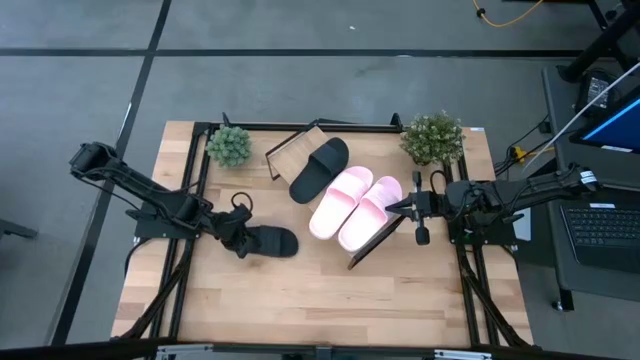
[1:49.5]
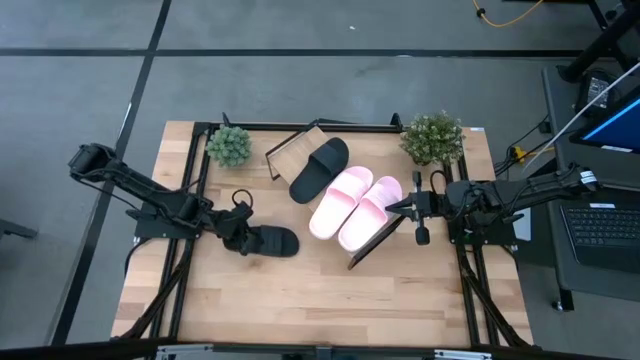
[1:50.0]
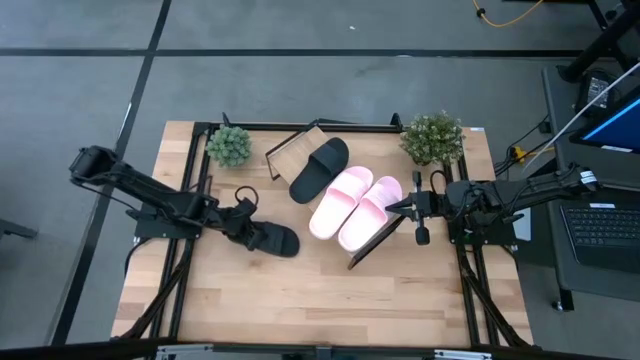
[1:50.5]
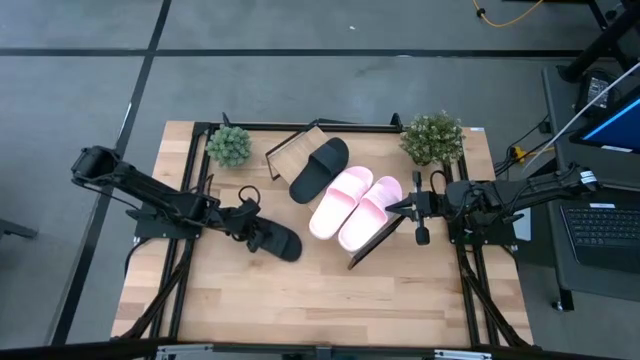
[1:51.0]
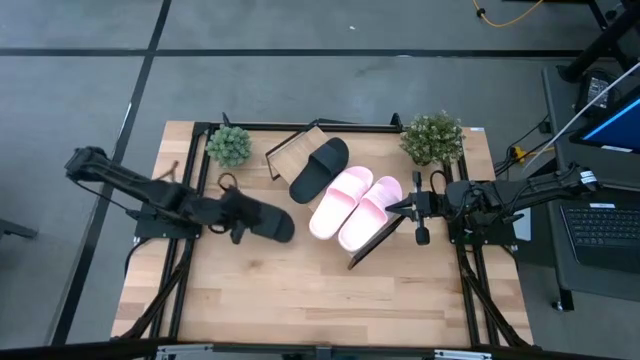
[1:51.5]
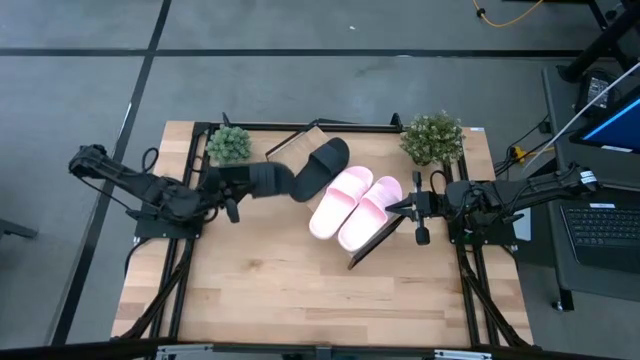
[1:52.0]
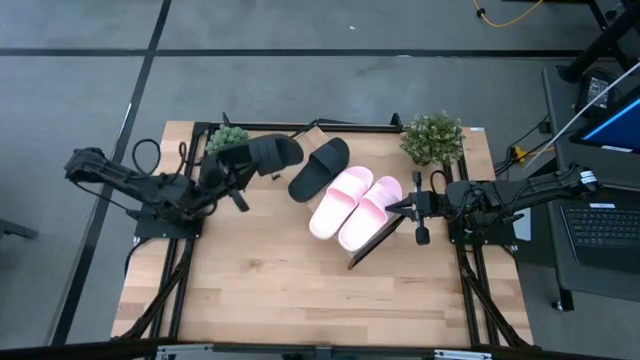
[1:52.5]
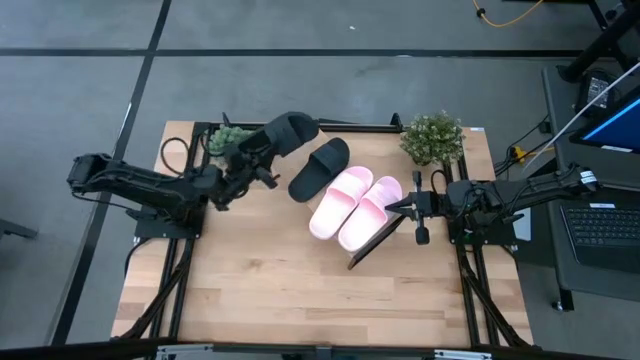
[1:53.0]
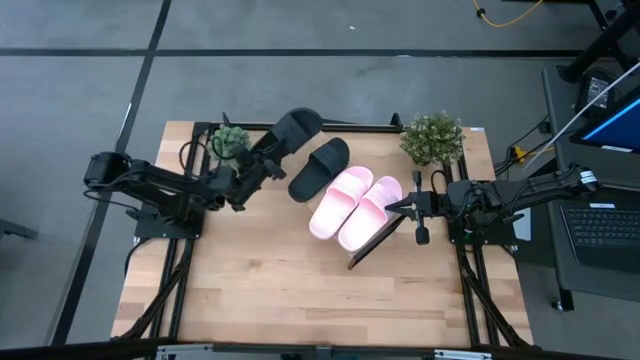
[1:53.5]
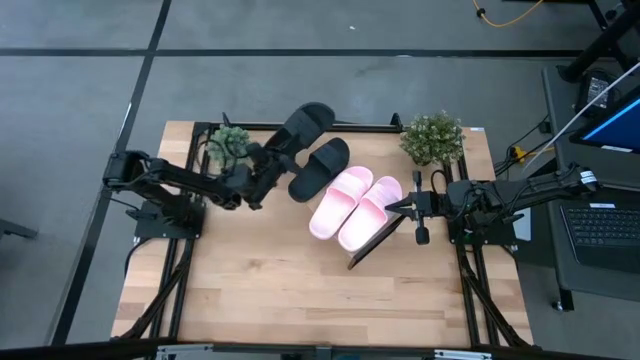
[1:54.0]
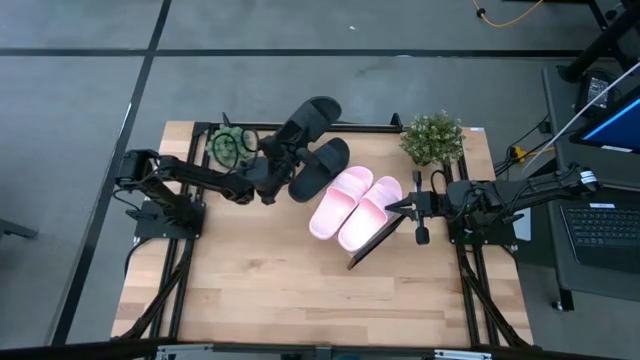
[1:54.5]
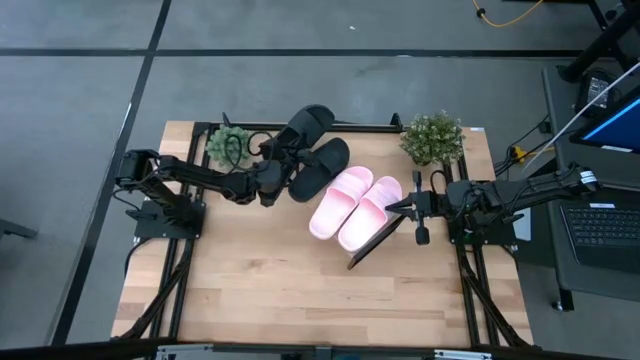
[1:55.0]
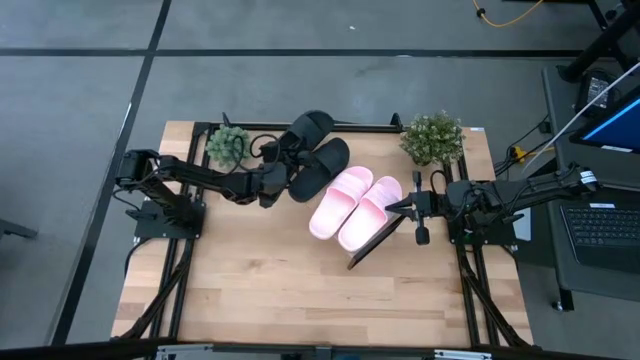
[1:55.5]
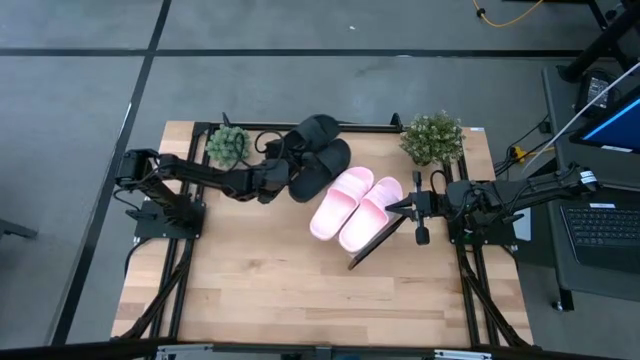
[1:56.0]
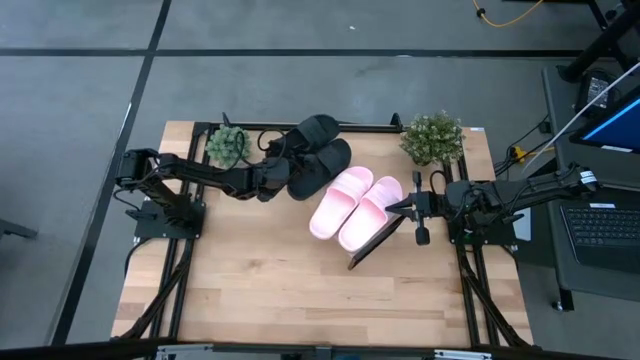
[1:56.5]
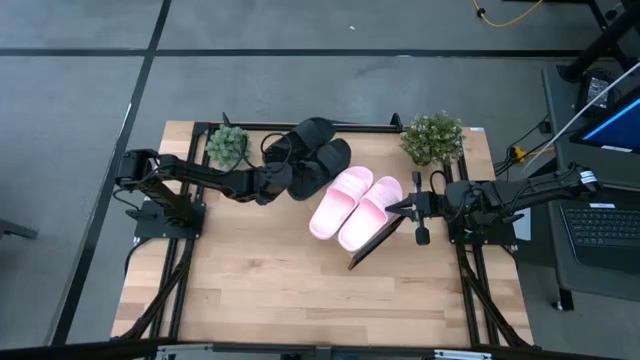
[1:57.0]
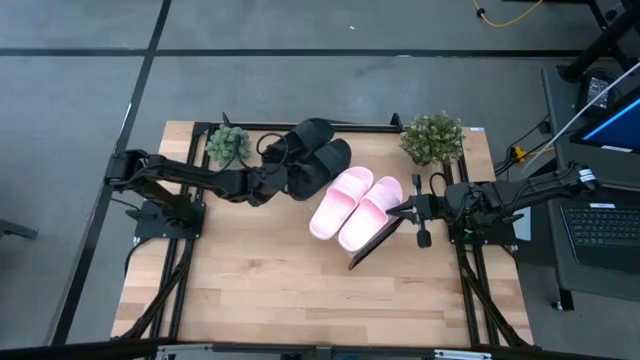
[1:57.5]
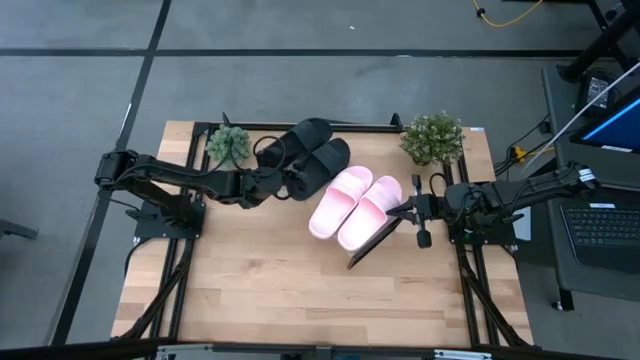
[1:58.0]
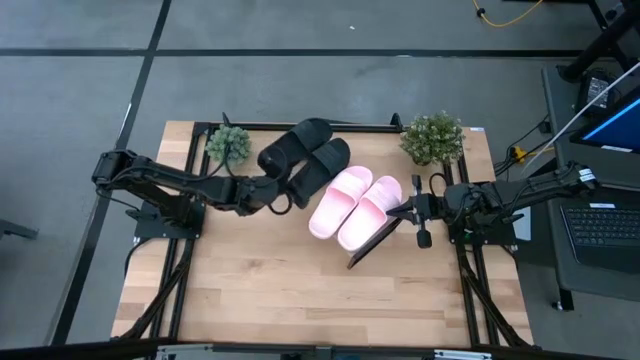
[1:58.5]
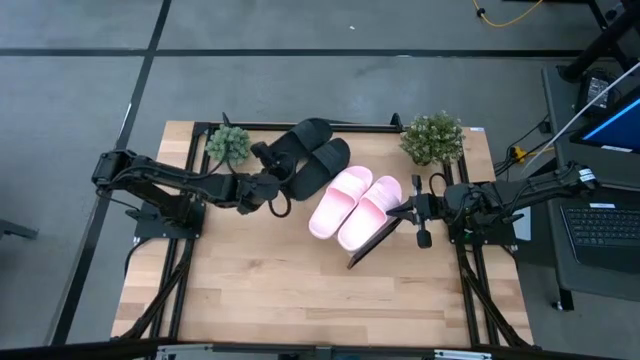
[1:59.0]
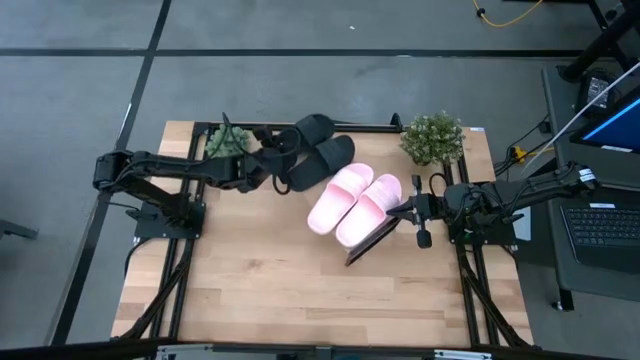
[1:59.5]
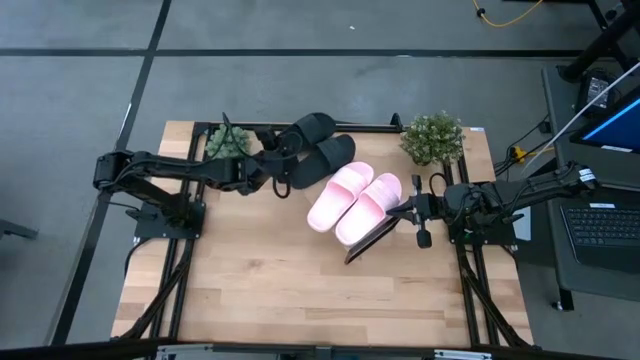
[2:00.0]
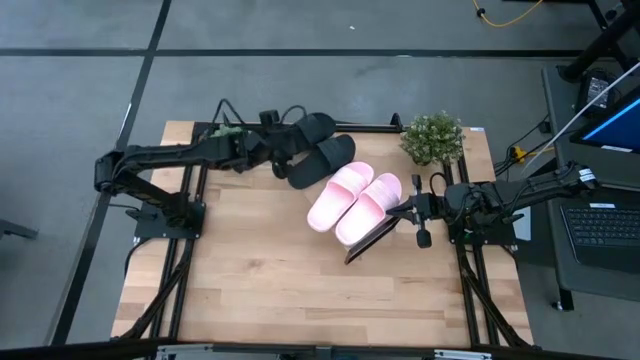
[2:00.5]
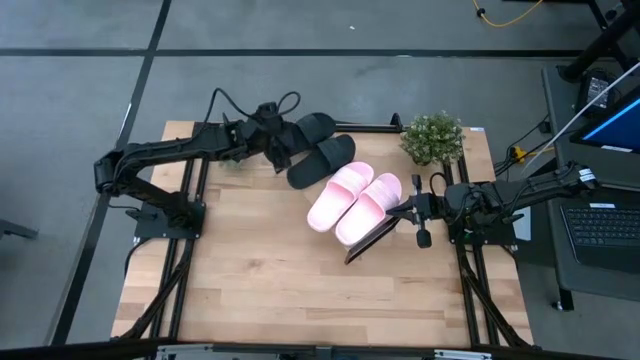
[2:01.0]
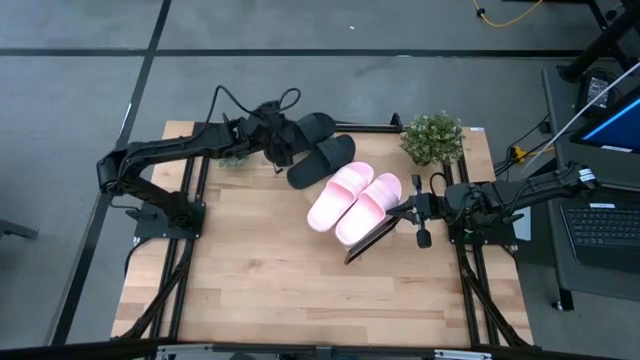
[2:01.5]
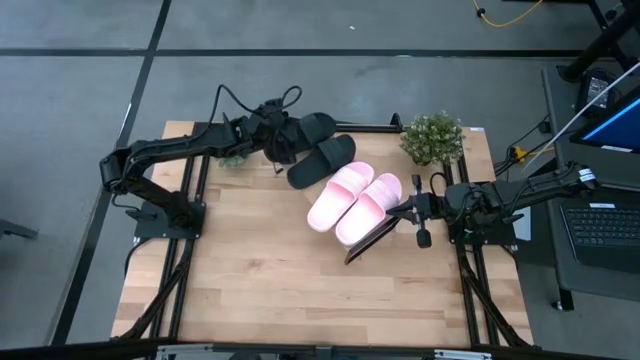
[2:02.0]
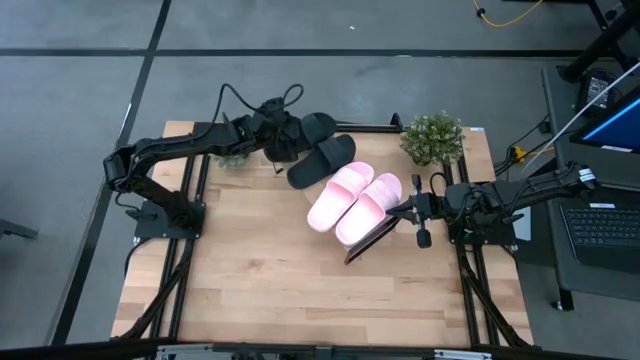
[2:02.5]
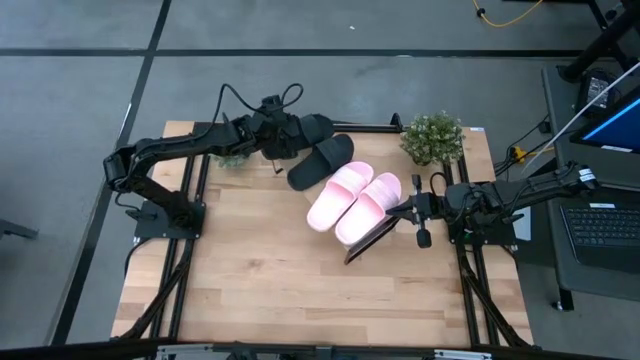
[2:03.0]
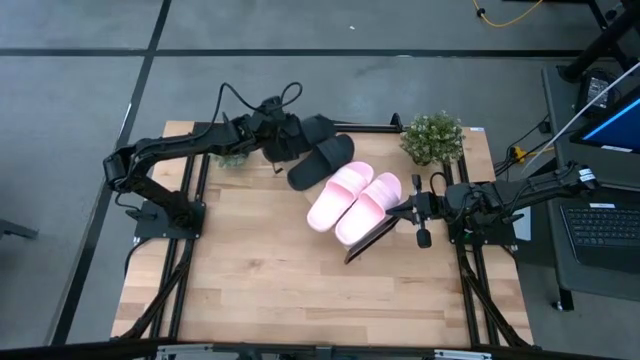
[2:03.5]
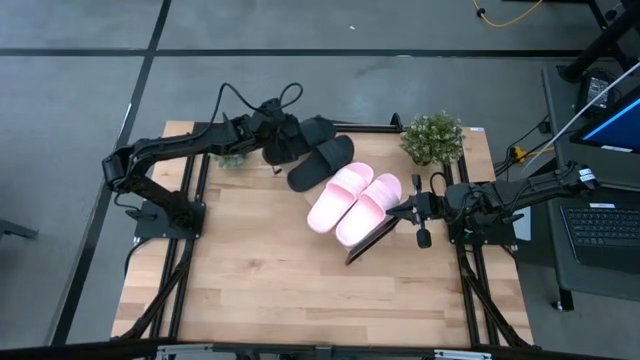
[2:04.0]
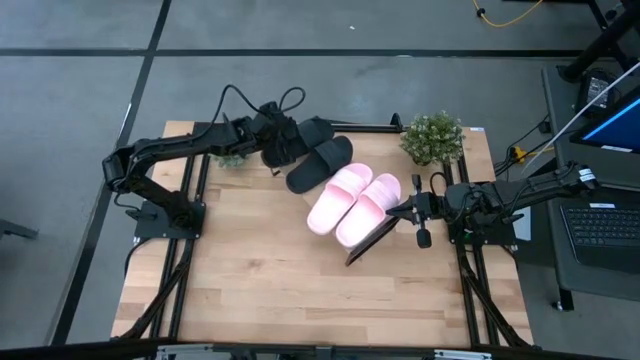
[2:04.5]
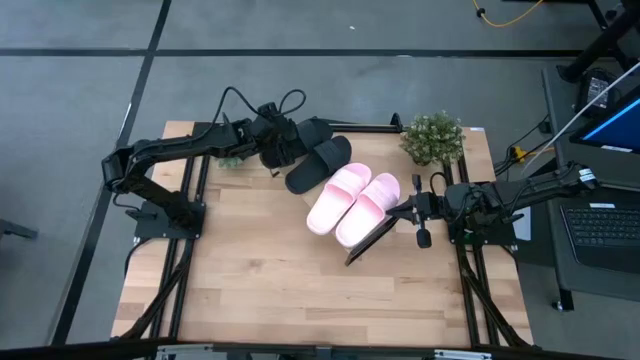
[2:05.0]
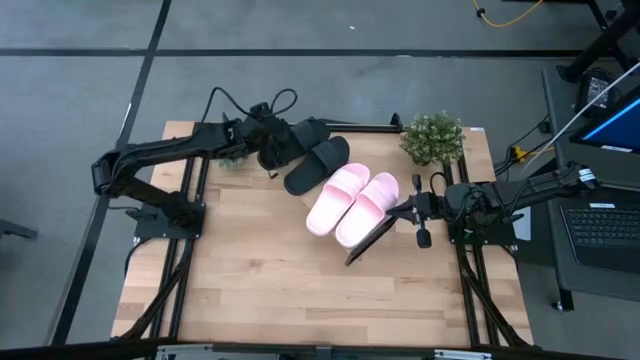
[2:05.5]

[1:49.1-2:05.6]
Task: Pick and place slides into the shelf
Put the black slipper on the shelf

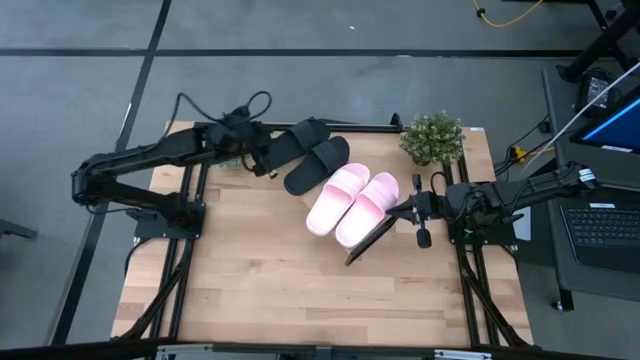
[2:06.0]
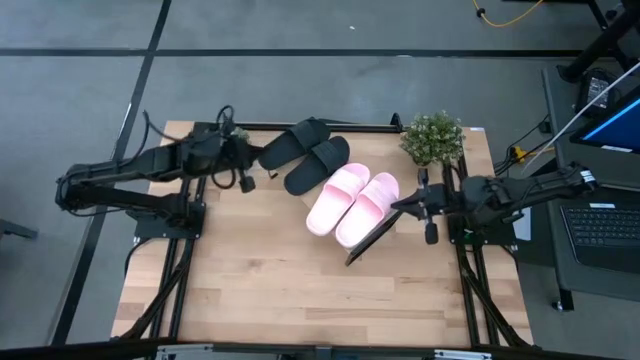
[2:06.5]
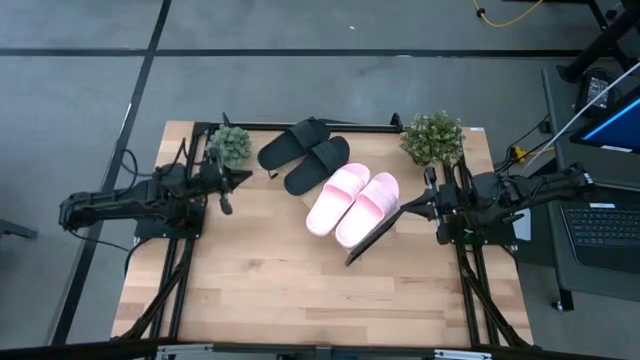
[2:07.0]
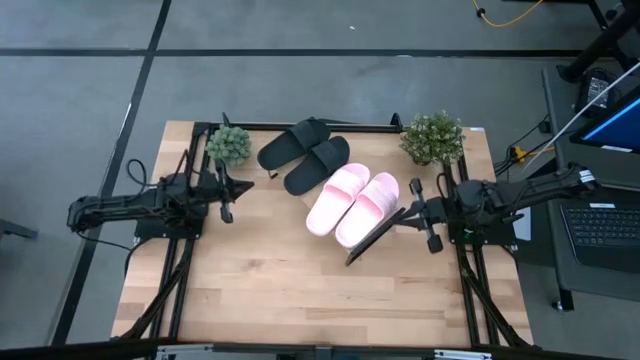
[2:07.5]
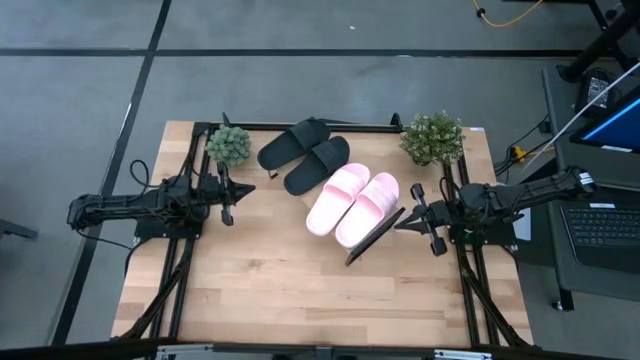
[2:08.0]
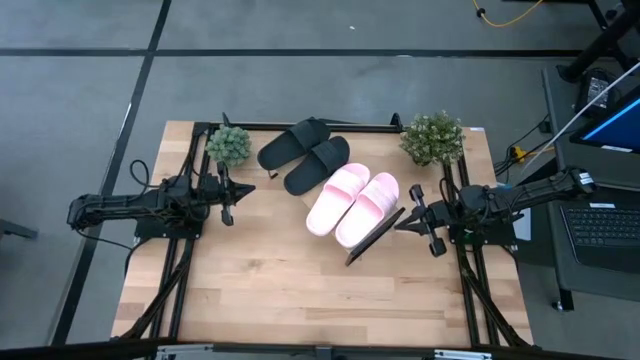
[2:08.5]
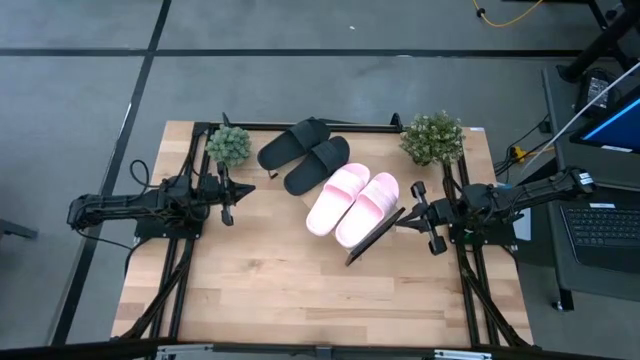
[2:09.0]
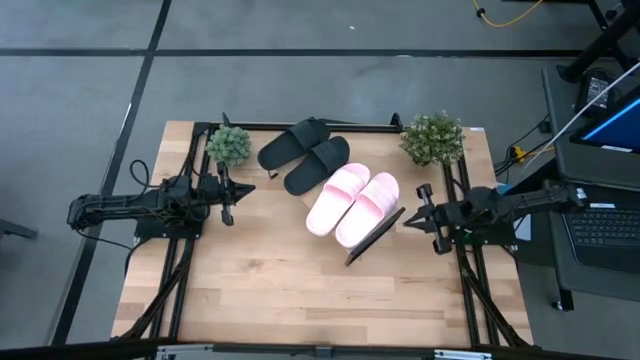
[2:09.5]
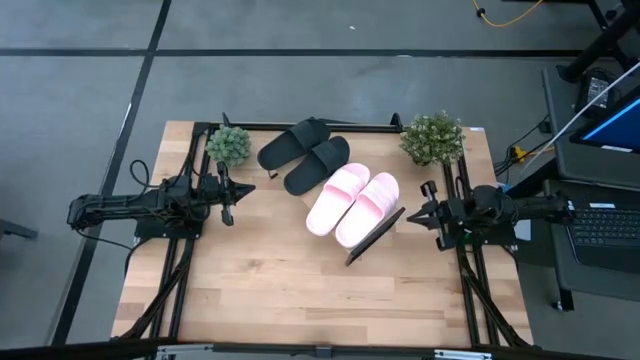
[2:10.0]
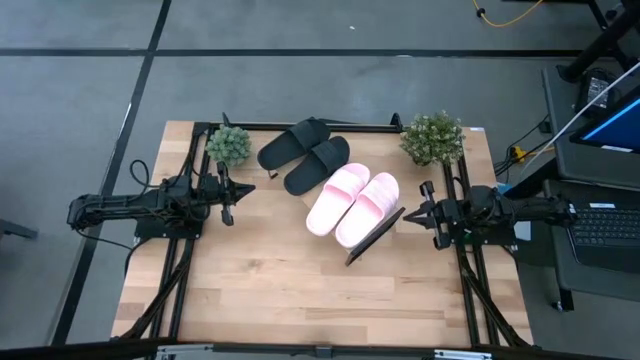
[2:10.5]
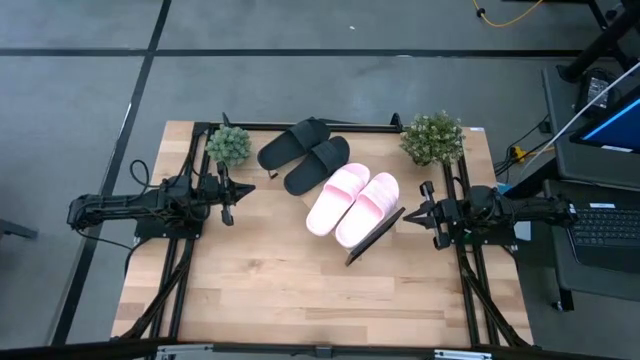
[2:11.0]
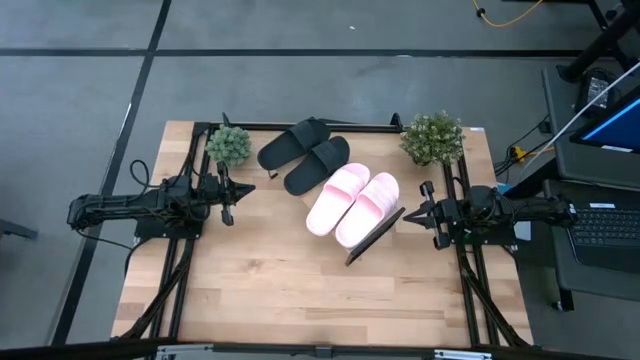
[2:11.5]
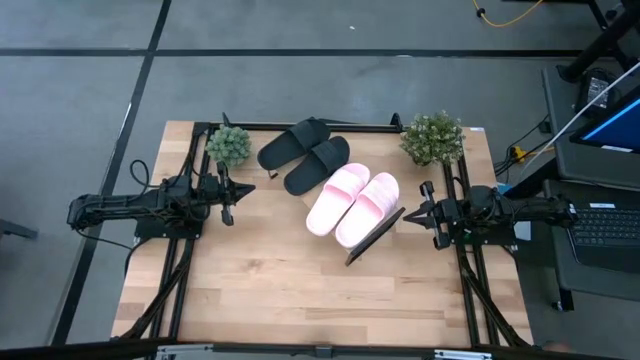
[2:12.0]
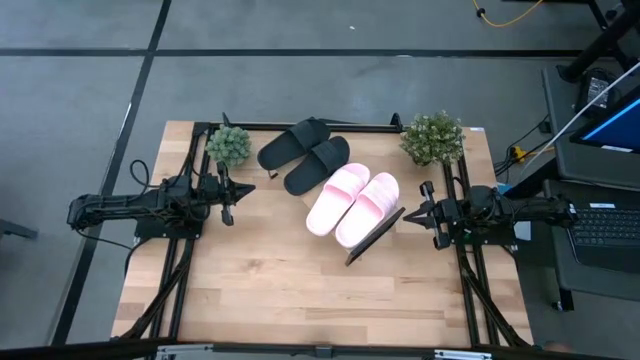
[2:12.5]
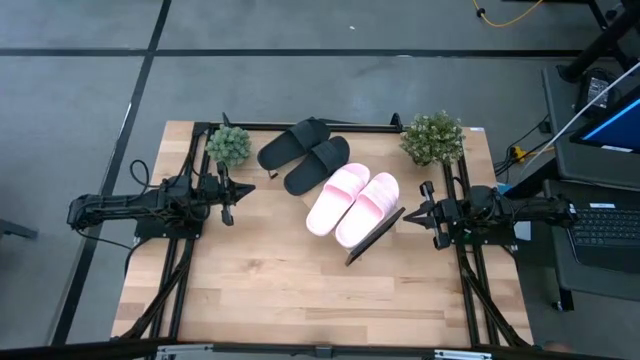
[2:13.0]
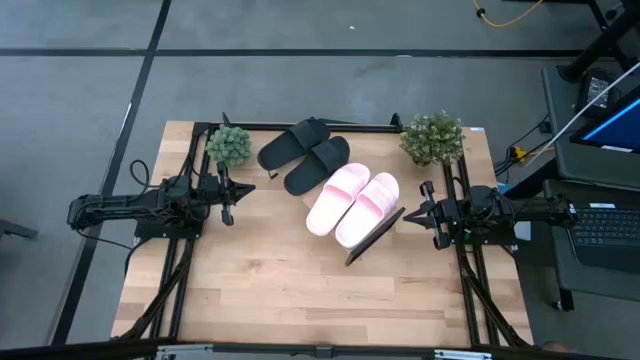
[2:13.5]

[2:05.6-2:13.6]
Return to Home Position
